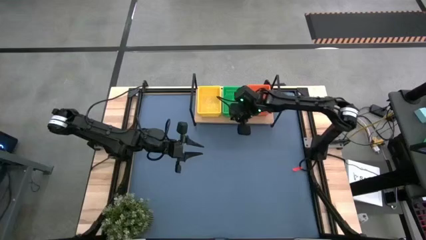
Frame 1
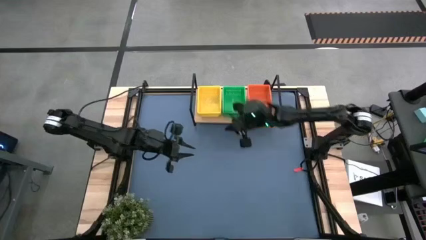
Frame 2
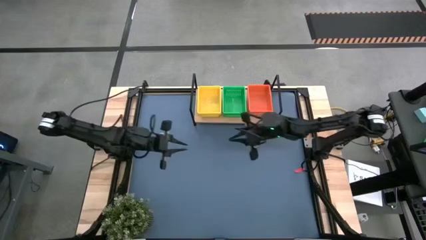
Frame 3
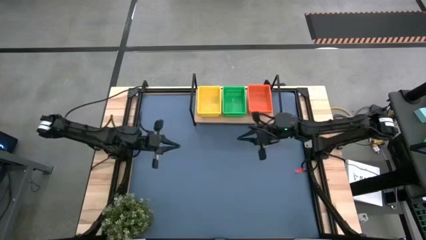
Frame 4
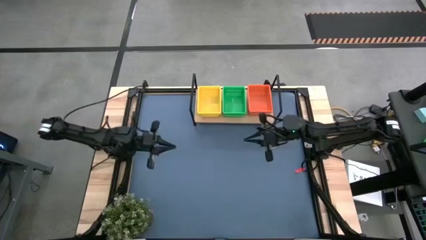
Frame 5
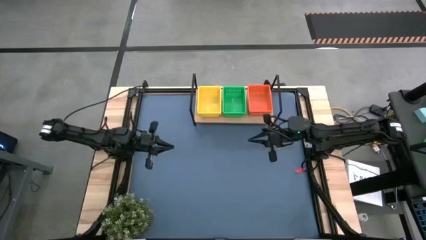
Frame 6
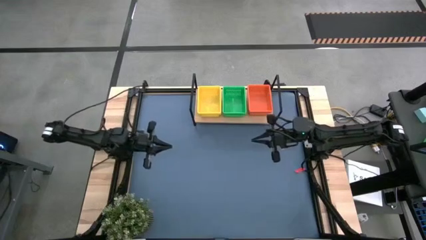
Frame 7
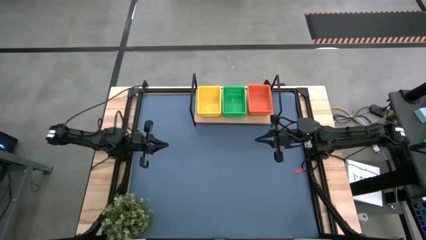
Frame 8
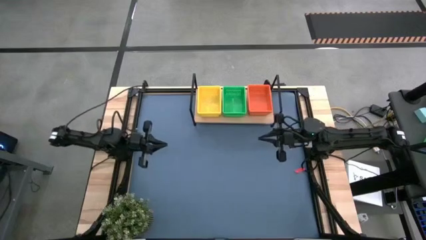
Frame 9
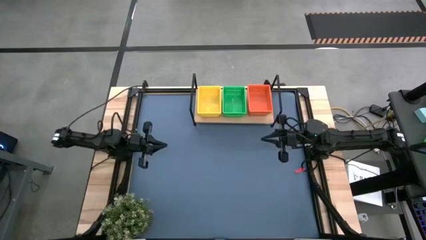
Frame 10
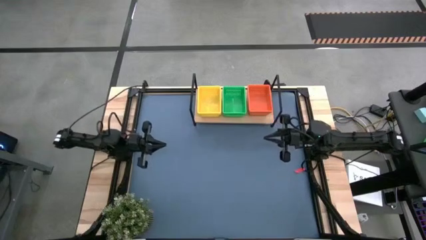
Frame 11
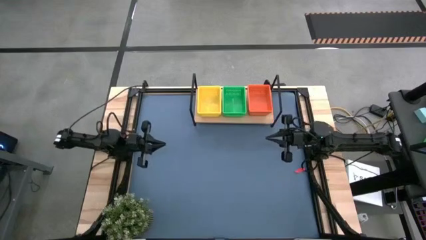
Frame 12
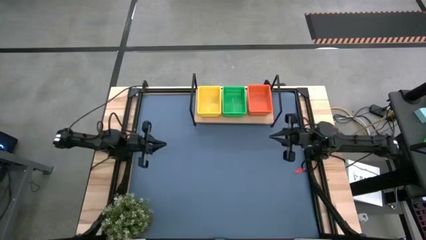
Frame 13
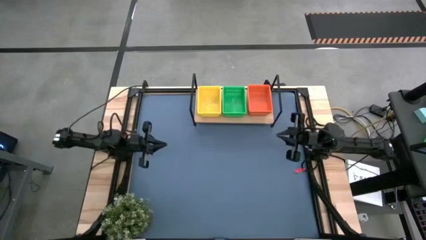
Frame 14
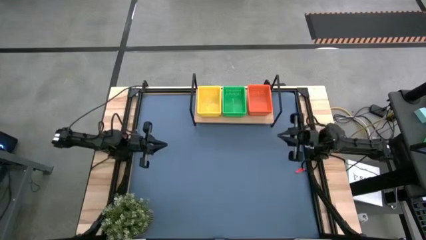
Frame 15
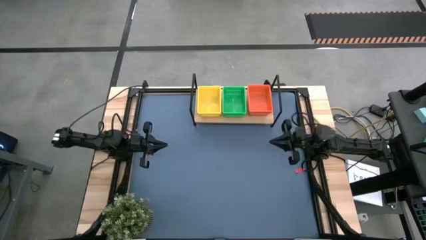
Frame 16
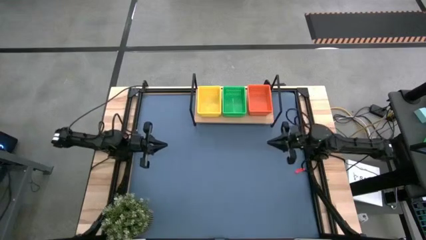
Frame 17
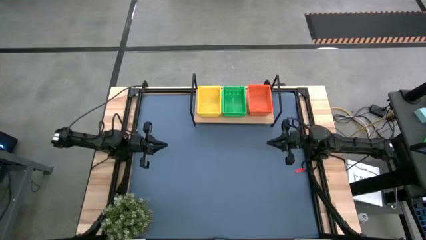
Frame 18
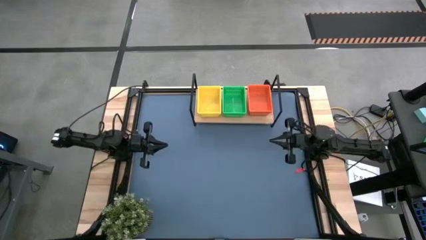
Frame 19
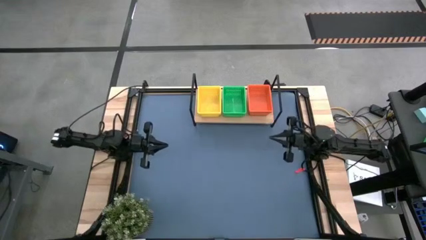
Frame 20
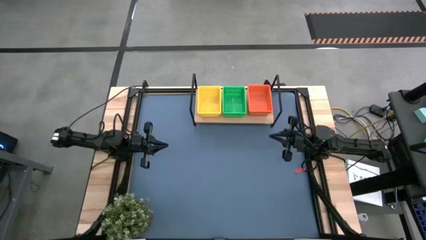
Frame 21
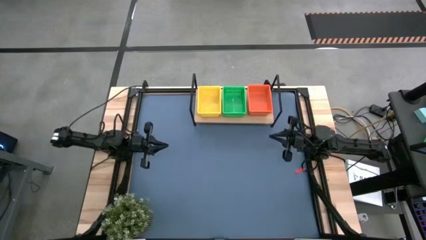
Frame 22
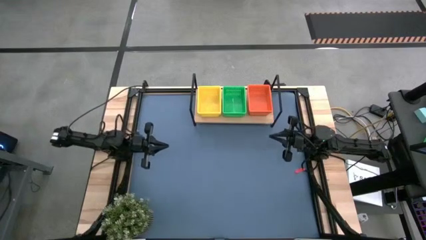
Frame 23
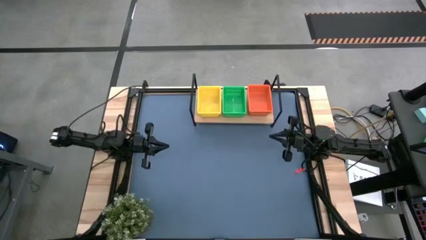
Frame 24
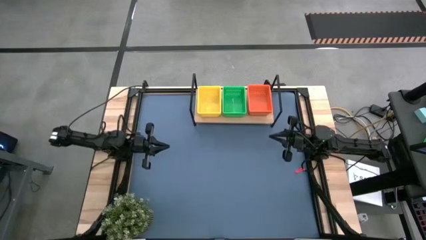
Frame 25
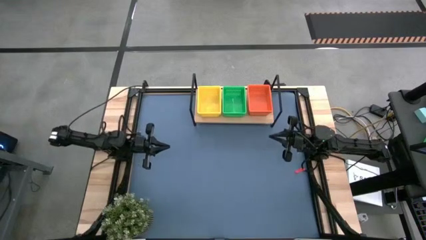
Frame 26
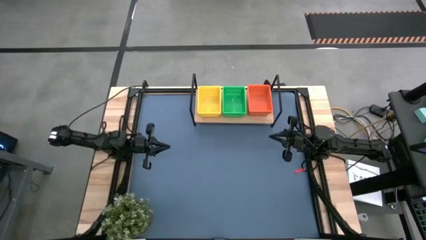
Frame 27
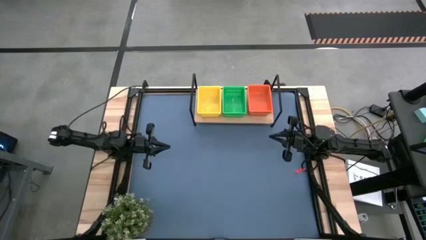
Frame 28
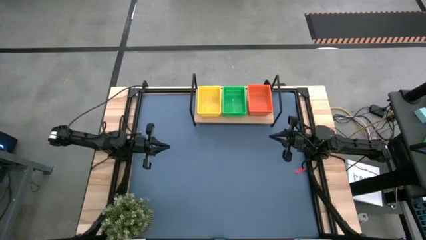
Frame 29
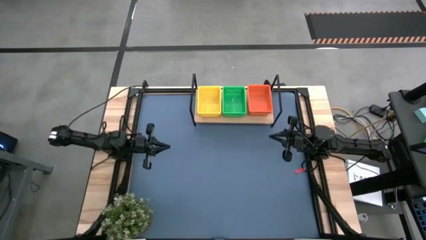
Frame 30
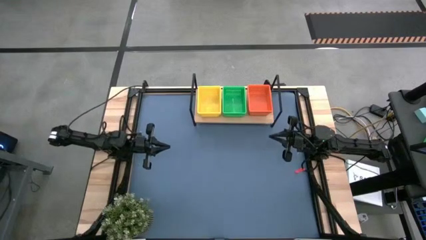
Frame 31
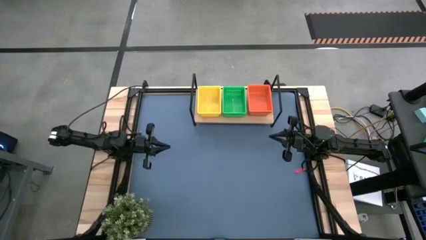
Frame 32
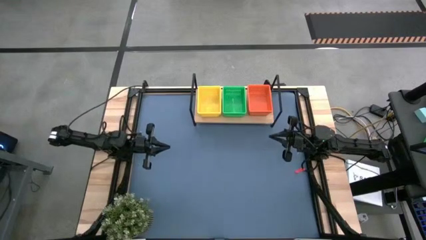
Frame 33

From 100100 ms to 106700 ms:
Task: Stack baskets on shelf by color
Return to Home Position

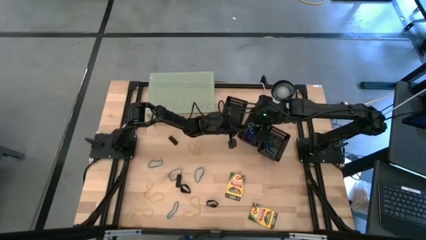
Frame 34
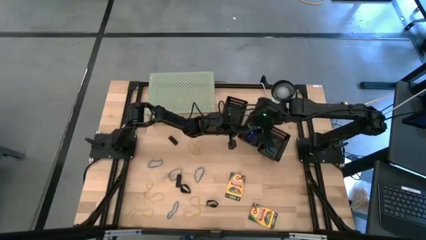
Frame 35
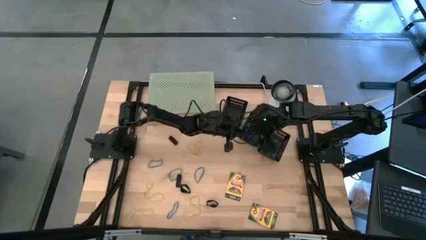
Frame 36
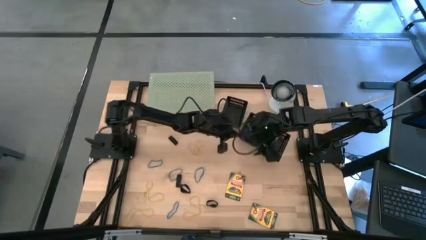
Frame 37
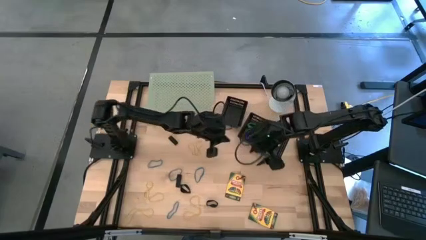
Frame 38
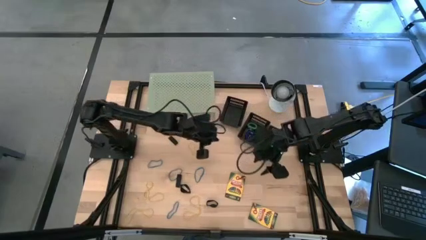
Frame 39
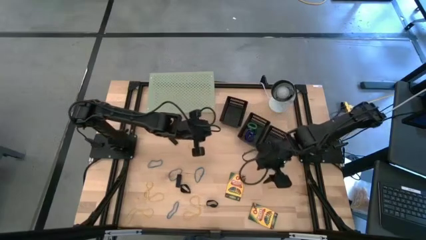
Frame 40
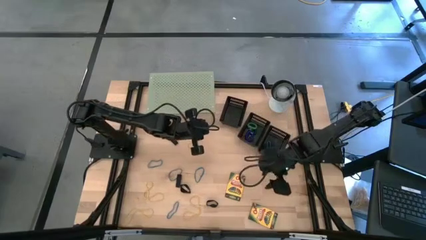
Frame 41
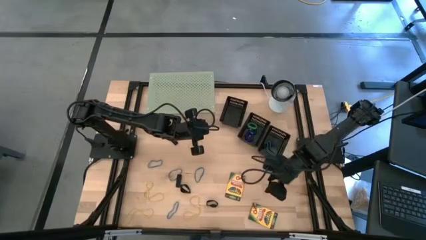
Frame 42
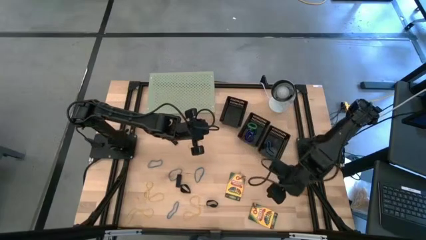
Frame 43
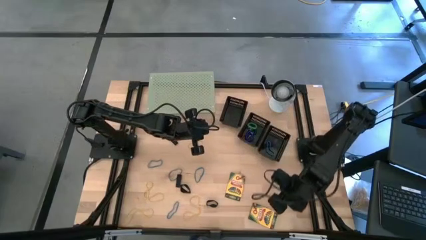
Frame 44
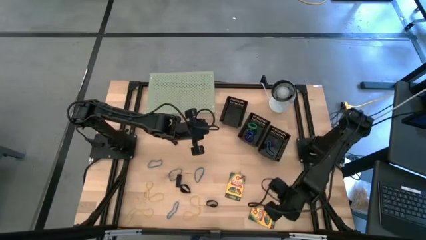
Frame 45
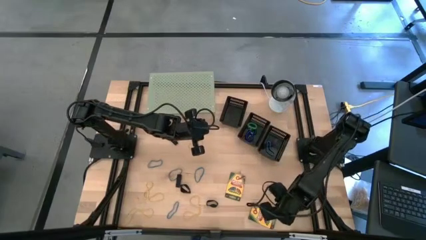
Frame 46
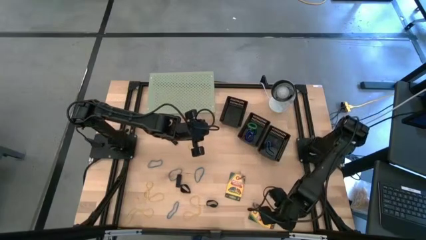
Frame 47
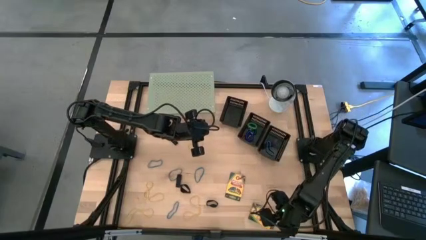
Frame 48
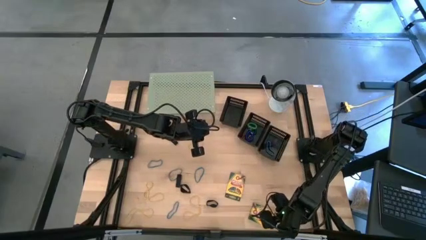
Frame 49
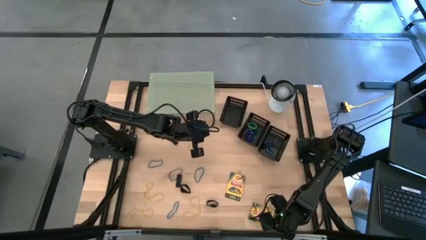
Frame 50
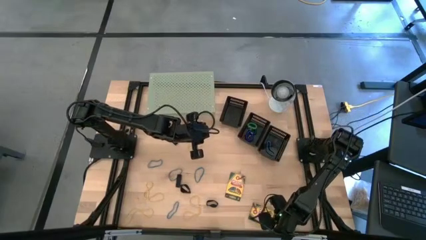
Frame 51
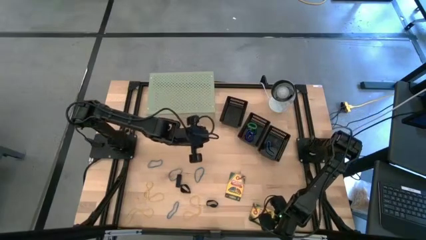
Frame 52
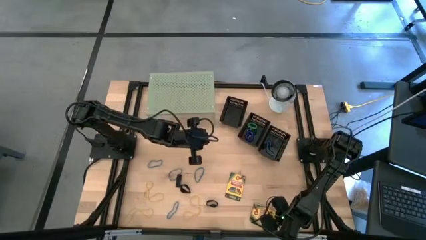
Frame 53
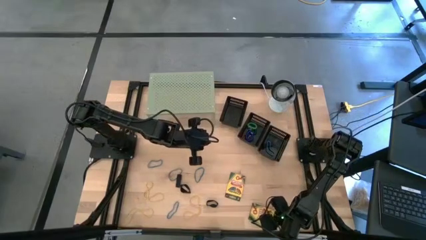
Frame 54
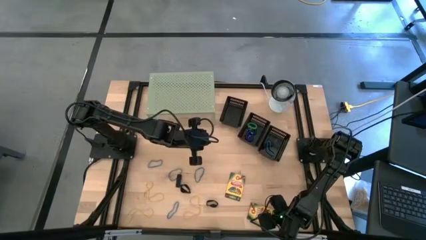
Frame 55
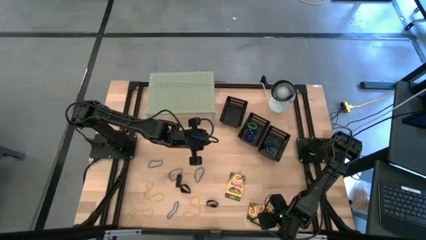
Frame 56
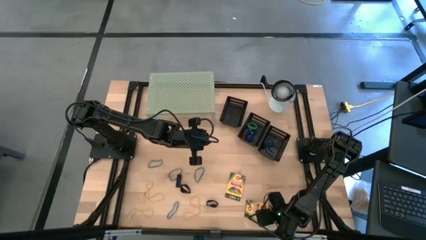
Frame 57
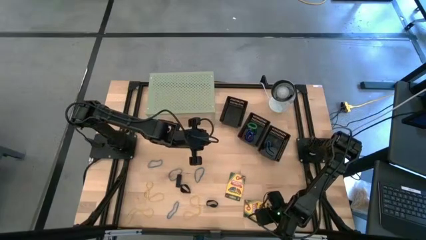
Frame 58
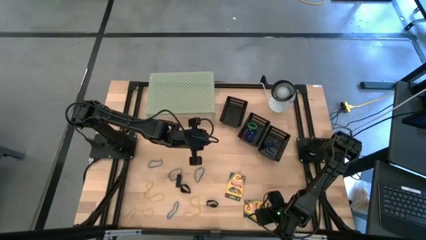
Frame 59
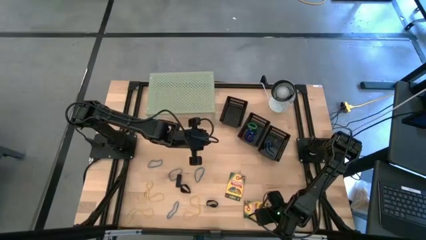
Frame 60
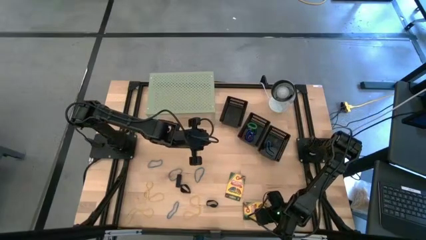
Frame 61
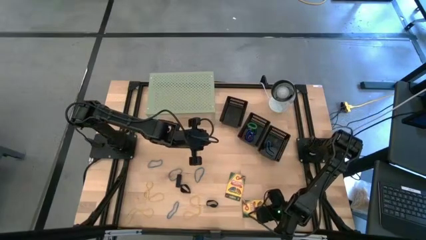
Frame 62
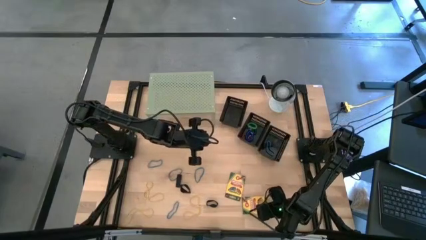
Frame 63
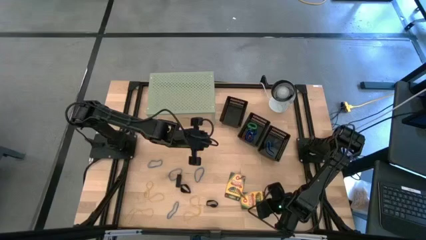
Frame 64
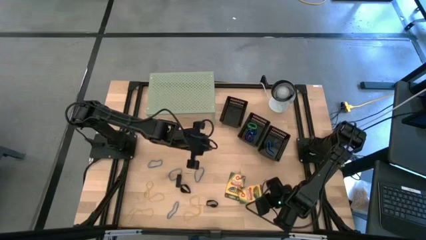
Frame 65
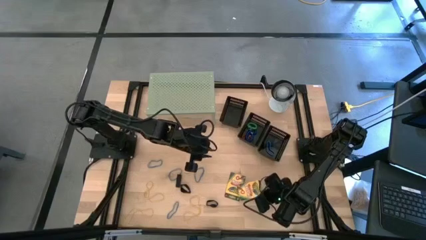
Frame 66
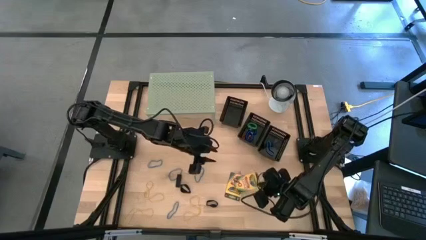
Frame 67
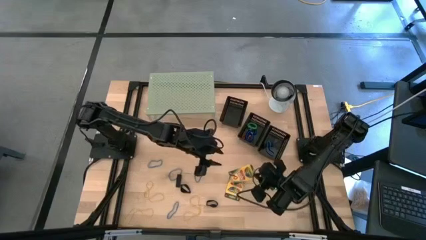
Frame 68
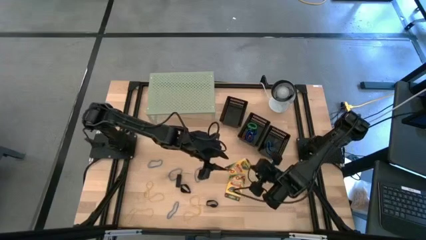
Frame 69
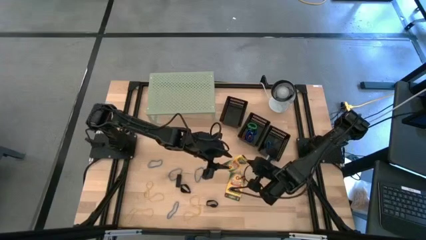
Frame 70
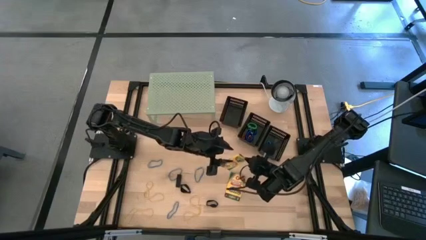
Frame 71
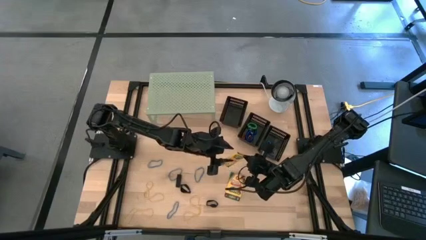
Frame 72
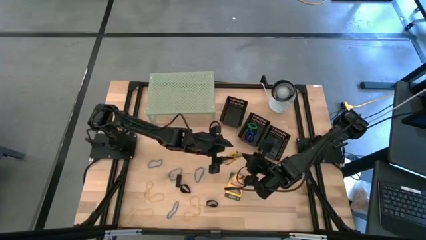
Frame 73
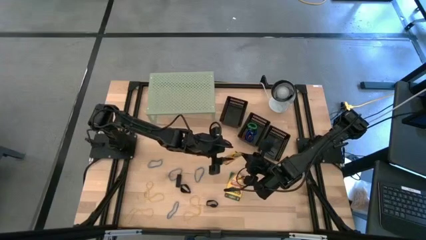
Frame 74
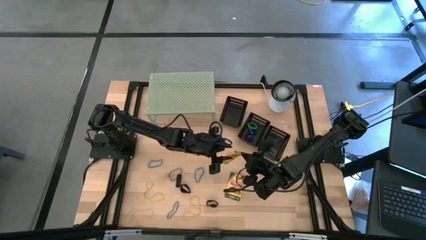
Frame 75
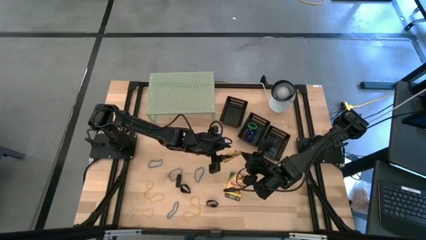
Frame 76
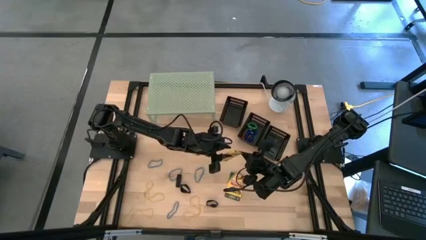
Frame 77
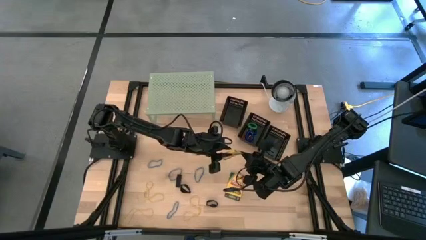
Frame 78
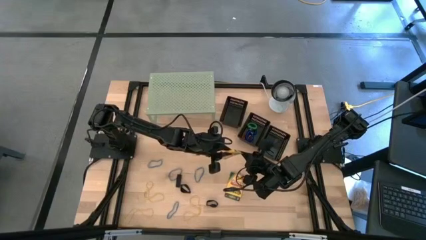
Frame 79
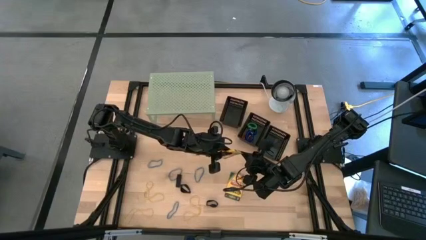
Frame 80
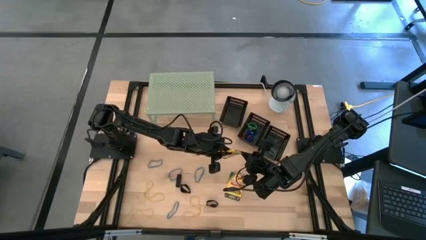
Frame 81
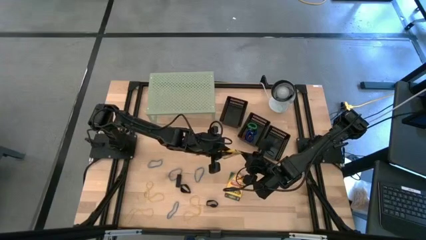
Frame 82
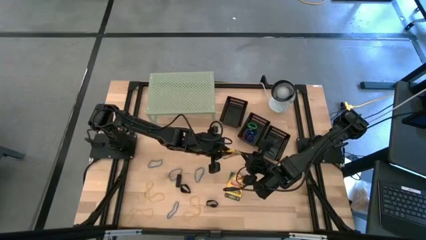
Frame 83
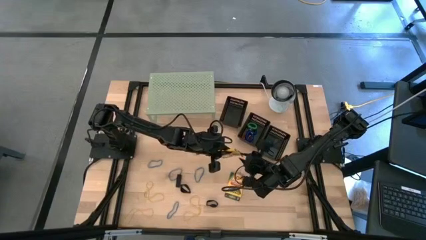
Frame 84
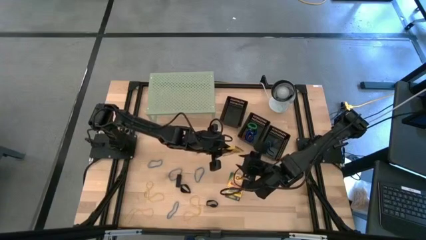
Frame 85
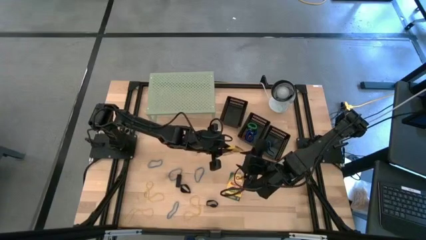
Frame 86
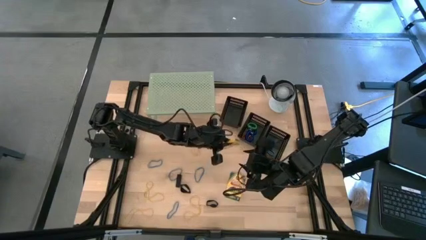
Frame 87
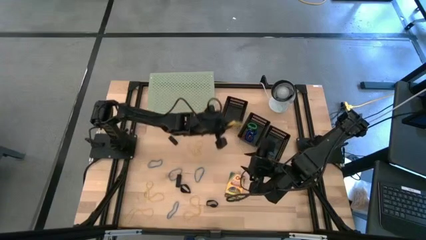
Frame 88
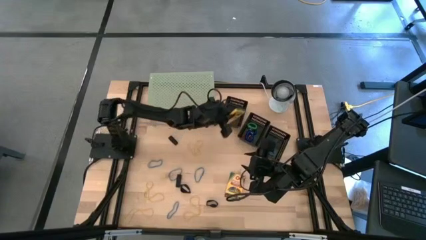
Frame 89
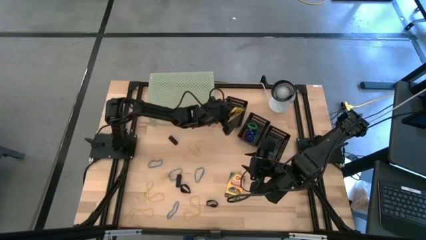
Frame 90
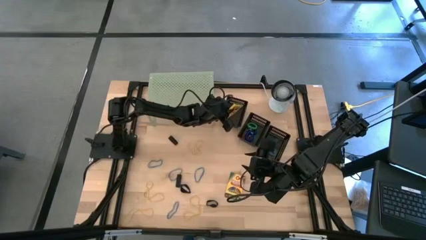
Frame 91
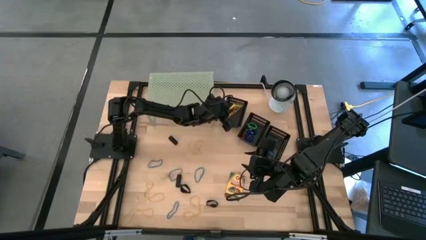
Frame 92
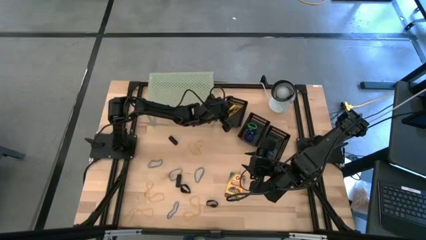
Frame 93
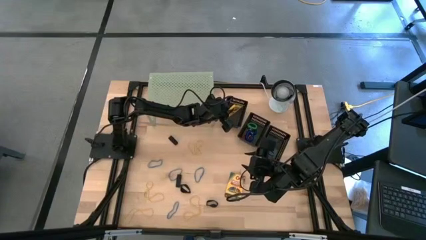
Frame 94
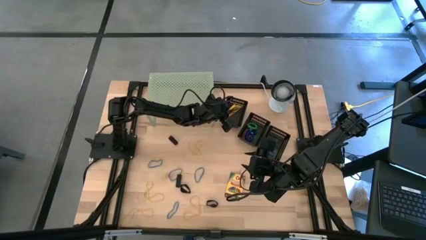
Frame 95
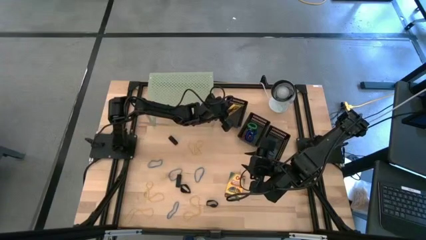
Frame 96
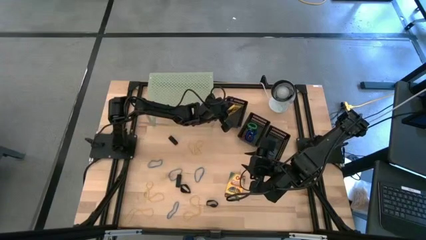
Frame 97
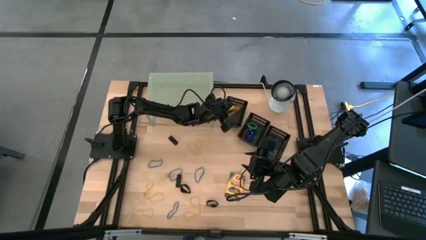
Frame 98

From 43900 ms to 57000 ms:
Task: Pick & Place Office Desk Supplies
Put the crayon box into the top black bin
